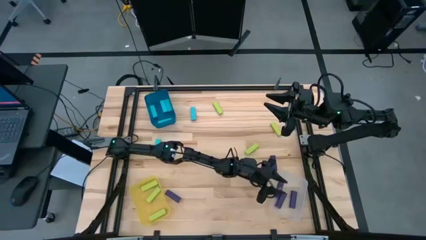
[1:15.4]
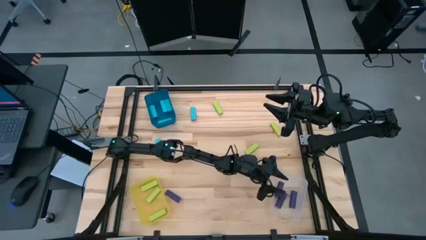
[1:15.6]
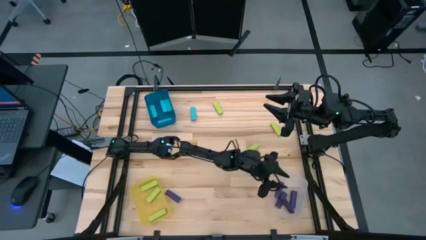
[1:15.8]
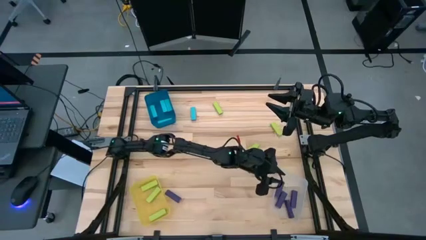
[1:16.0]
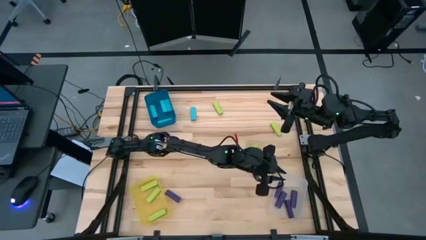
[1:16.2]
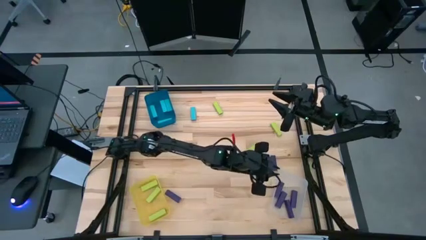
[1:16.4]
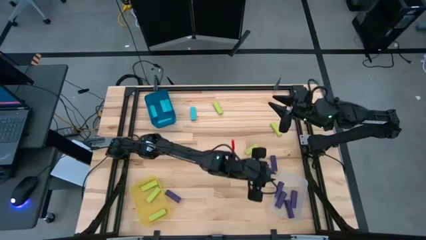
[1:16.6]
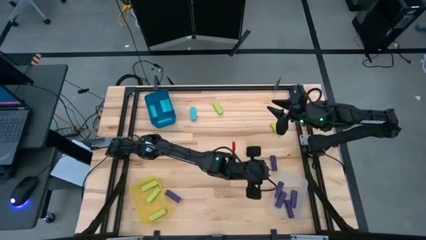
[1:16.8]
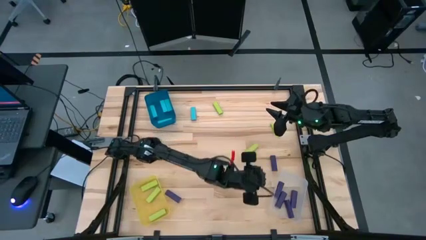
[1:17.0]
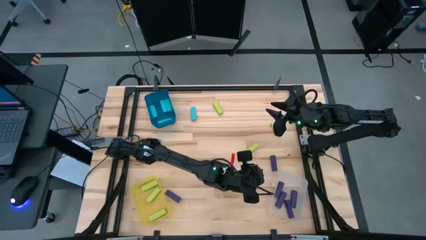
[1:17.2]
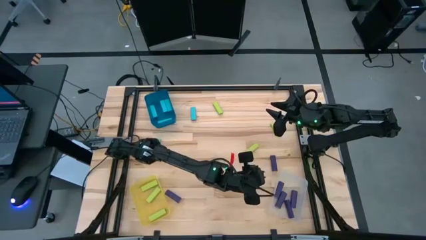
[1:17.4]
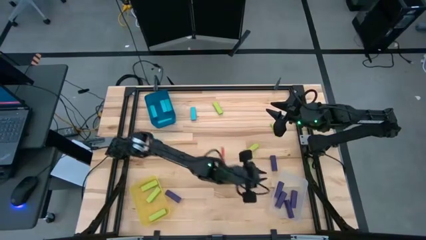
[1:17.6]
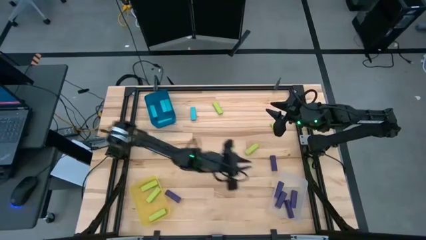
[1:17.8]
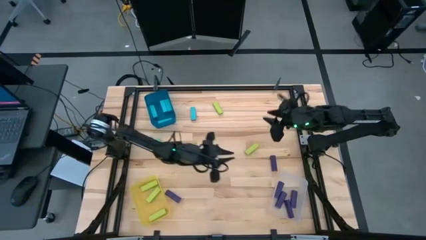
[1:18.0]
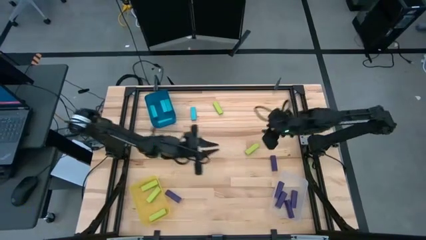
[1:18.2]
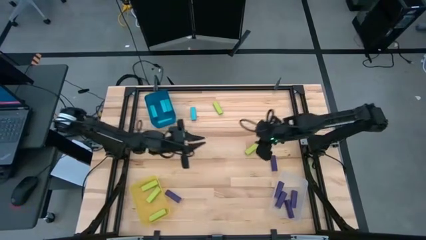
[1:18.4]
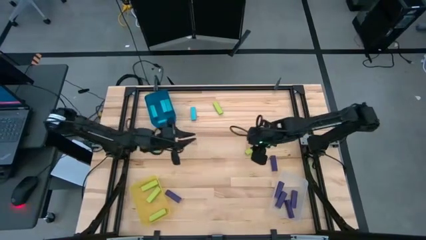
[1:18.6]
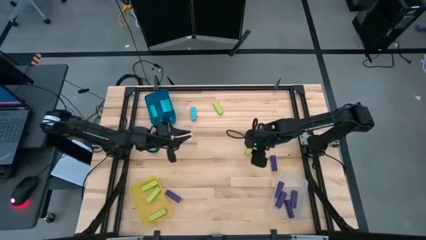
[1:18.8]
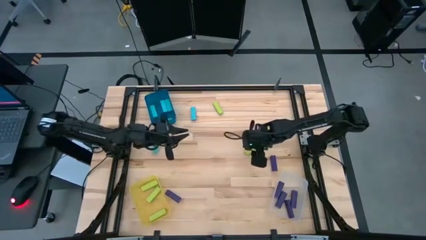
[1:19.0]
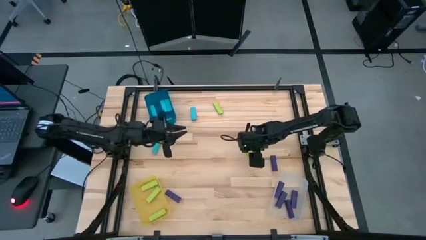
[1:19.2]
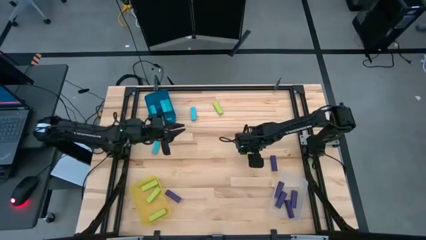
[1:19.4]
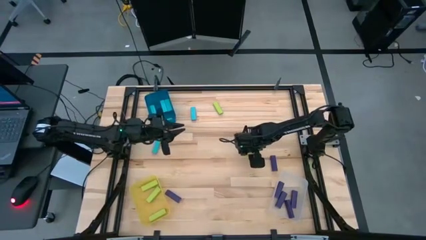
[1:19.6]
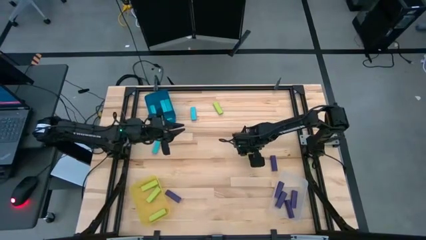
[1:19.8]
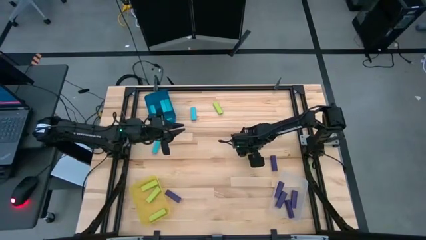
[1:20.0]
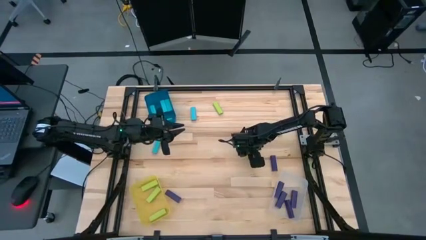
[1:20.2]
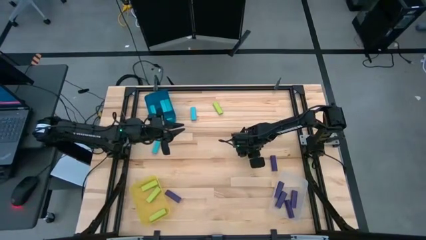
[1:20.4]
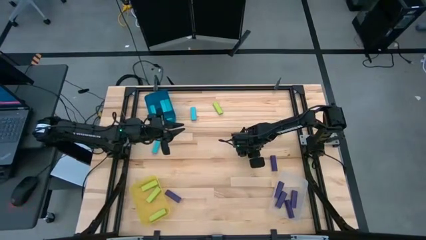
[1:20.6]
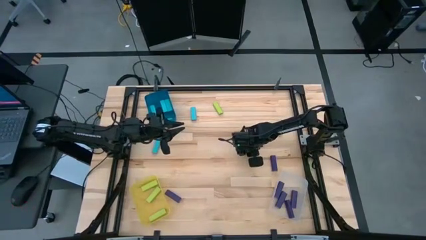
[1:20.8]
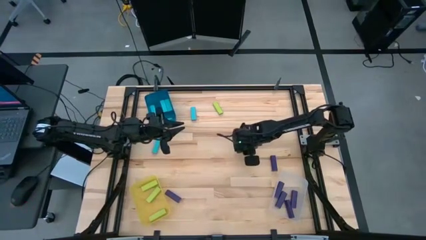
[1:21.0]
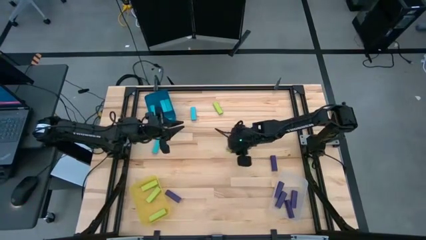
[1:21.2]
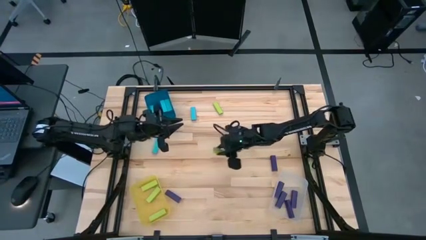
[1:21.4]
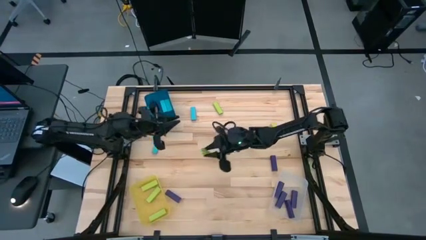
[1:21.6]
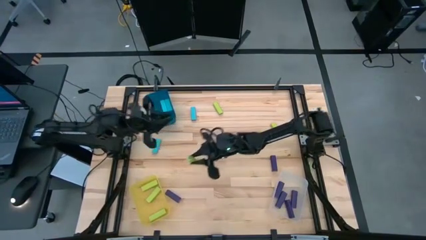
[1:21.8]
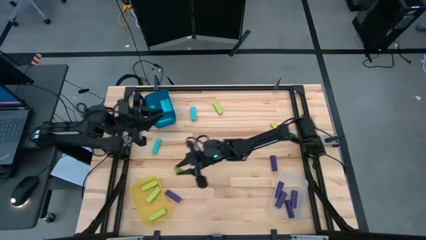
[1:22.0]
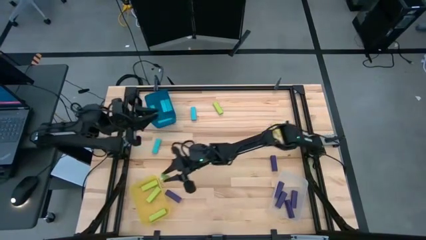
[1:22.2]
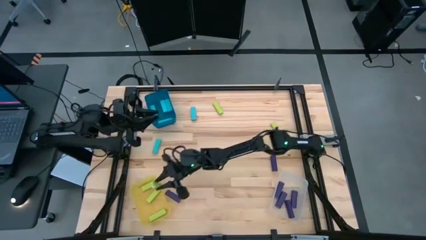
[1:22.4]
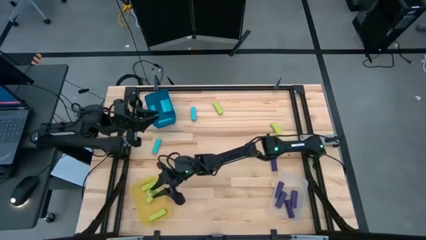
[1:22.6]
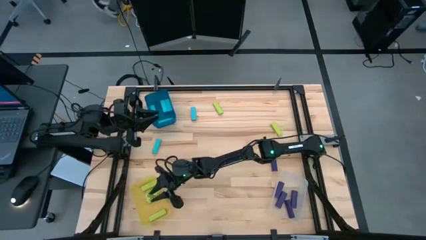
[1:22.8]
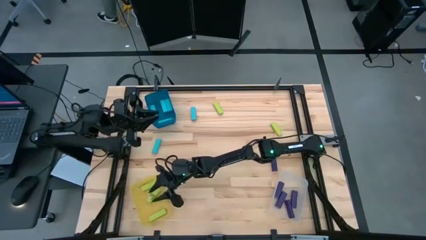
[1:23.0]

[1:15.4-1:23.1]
Task: Sort blocks
Put the green block into the yellow bin

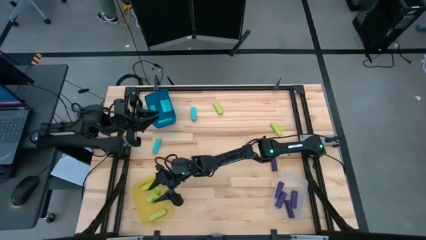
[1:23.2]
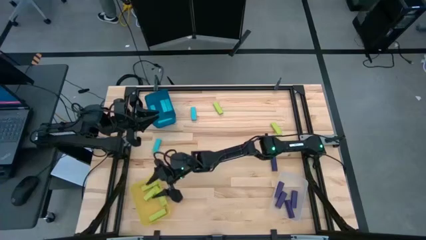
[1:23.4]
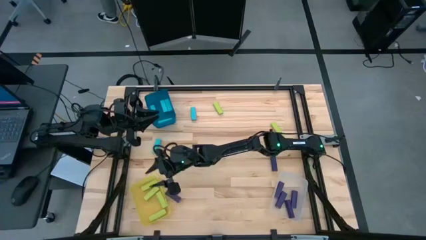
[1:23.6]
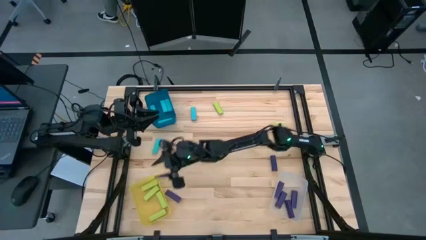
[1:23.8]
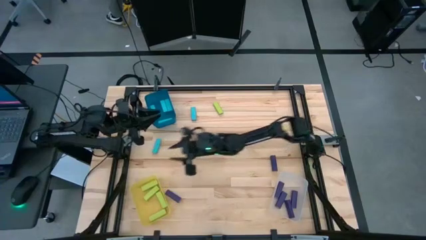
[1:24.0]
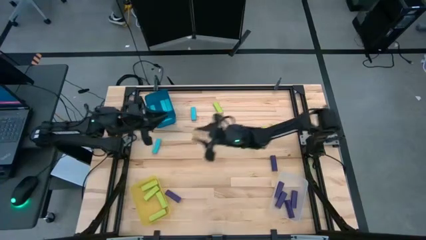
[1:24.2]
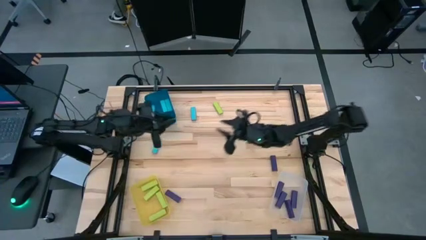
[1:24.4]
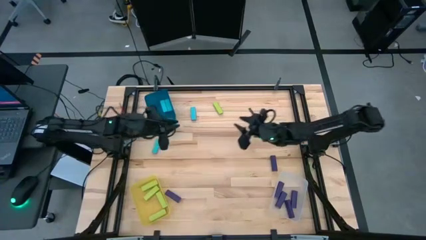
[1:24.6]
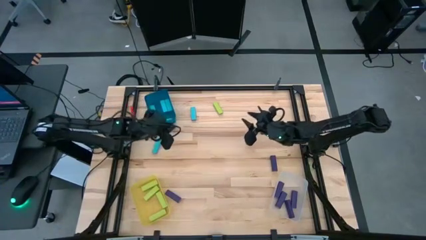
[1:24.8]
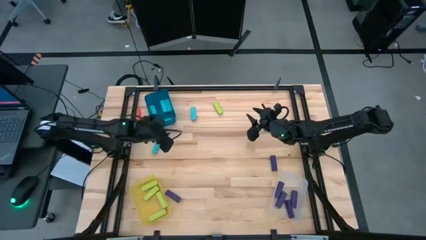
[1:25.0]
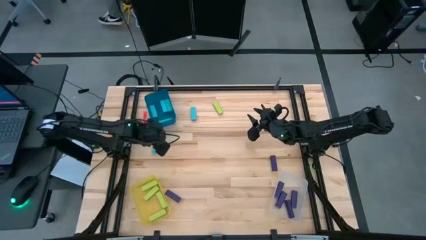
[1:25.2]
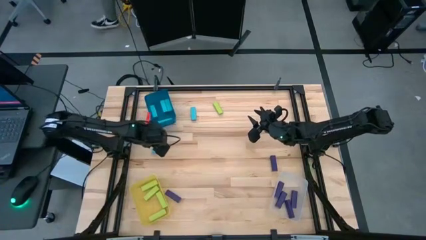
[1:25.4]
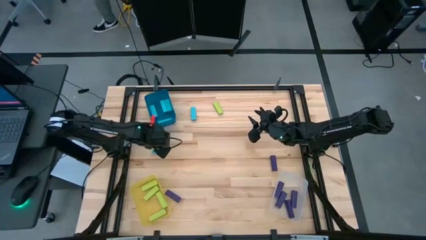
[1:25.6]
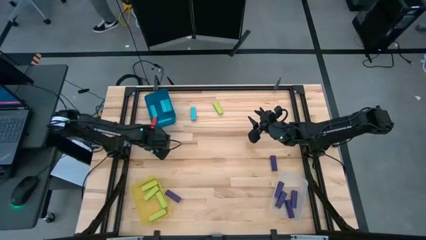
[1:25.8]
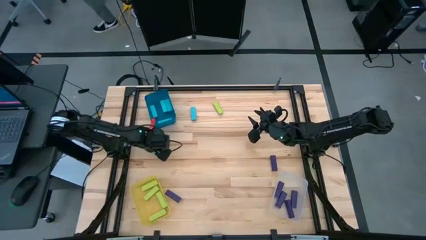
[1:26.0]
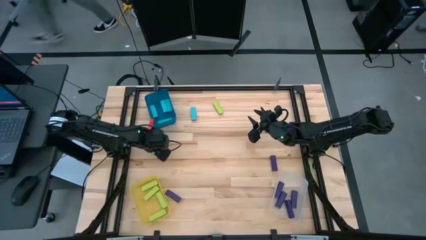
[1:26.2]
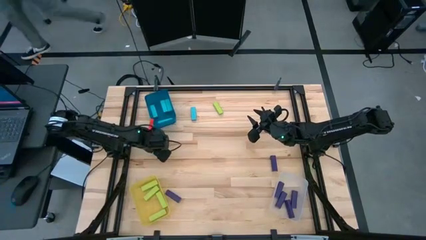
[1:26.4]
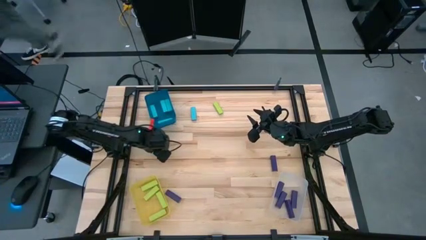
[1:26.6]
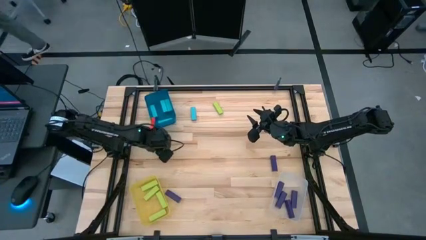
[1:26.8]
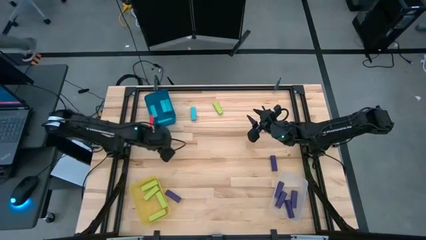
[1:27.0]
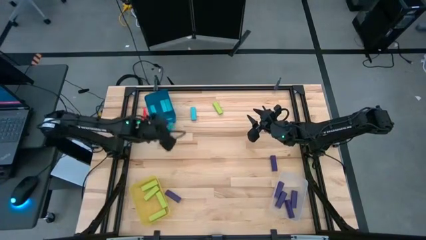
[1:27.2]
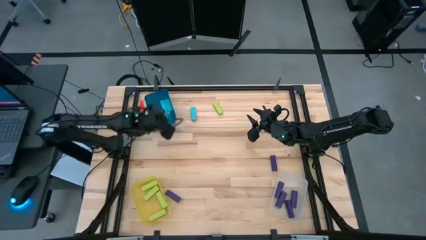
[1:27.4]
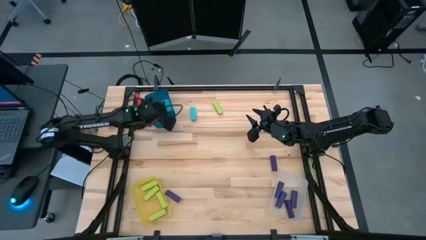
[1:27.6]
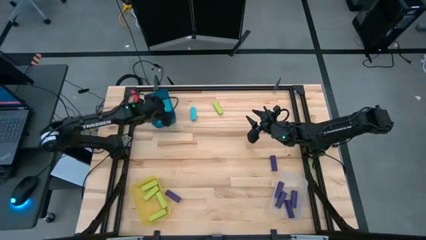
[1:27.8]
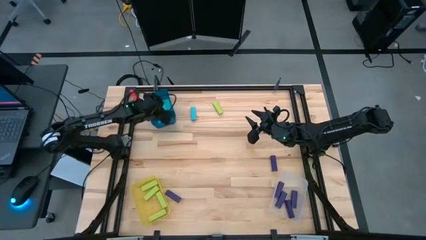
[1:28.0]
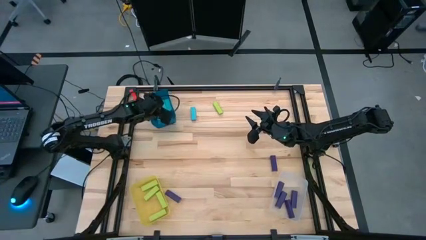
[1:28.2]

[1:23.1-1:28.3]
Put the blue block into the blue bin

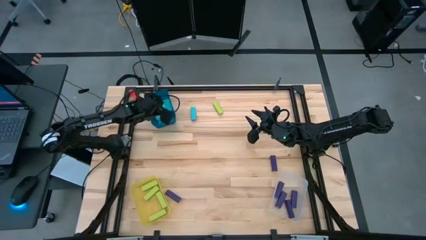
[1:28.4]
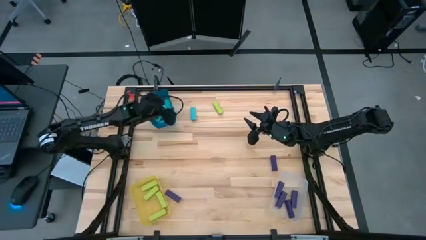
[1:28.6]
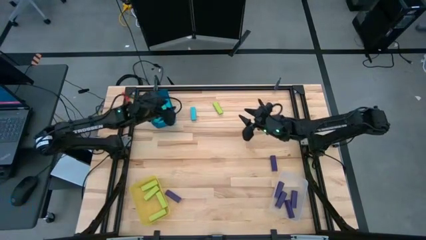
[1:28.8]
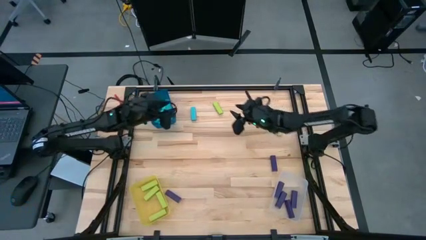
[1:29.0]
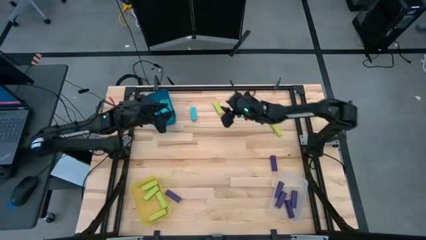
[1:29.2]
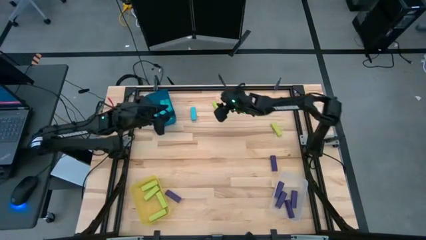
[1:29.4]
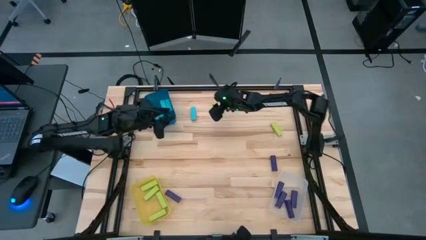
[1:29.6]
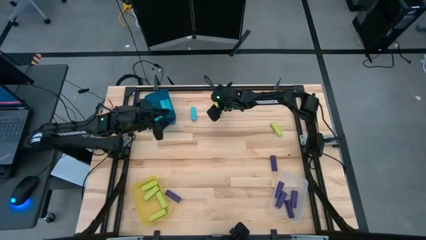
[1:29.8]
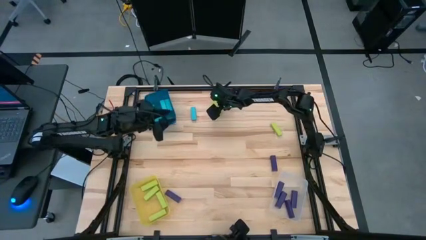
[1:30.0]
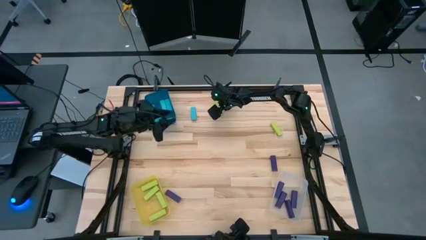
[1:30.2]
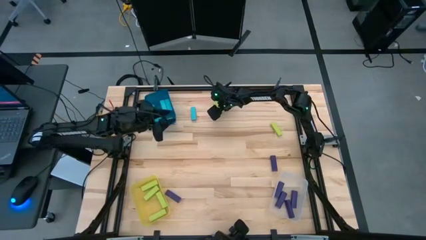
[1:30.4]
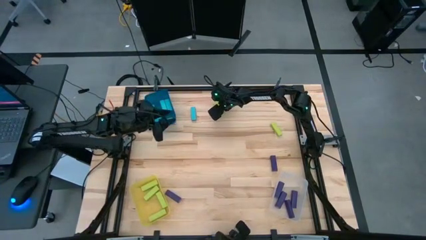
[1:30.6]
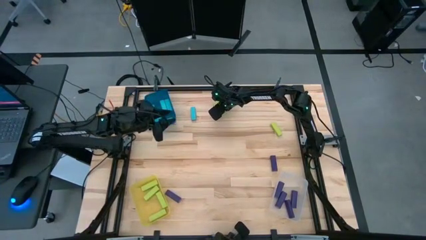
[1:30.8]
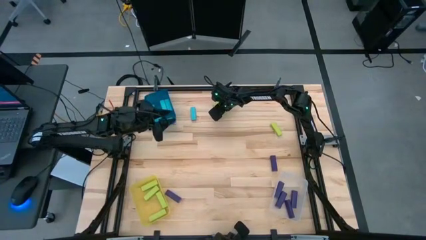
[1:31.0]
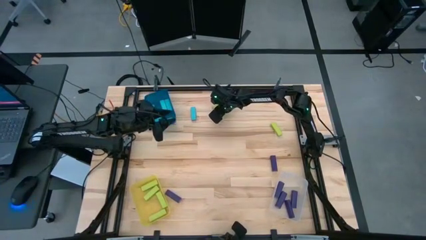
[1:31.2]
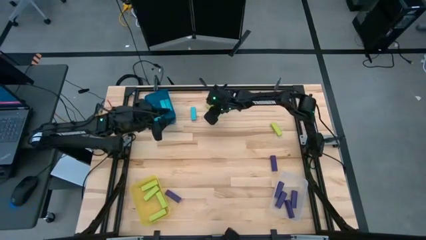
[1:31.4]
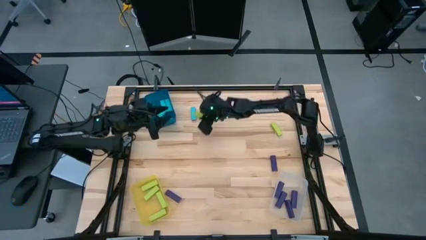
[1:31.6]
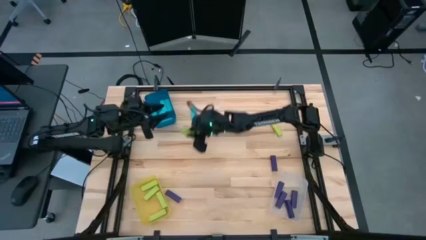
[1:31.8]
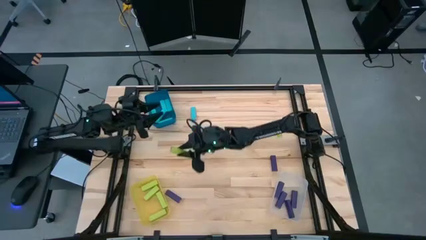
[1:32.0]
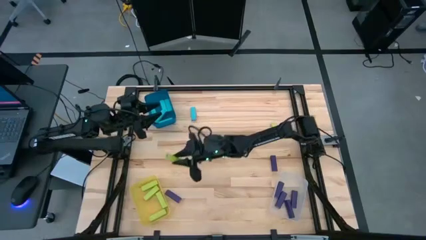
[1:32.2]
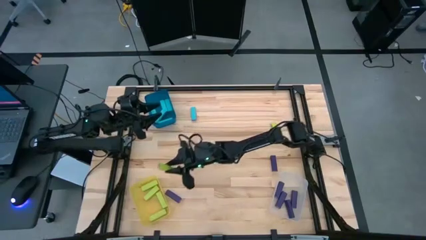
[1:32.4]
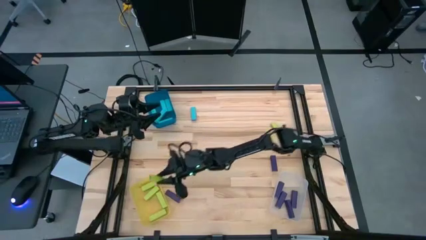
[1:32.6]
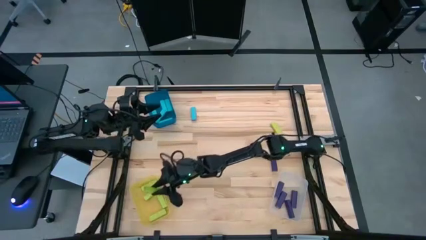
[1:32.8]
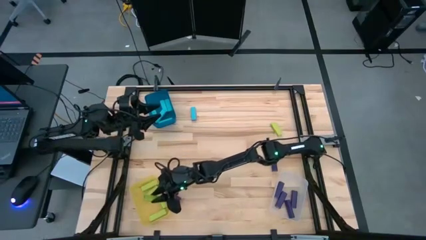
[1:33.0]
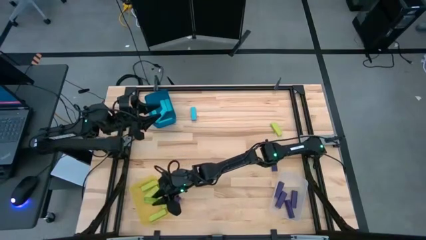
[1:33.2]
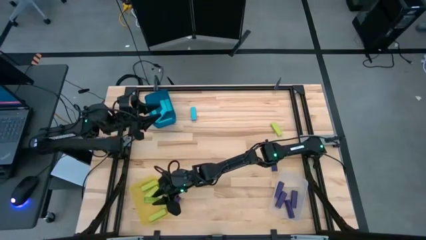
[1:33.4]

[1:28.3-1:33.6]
Put the green block into the yellow bin
